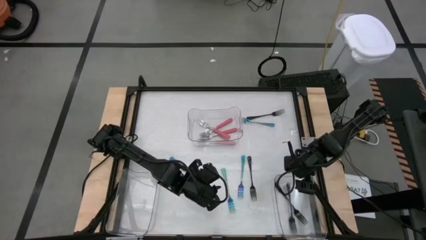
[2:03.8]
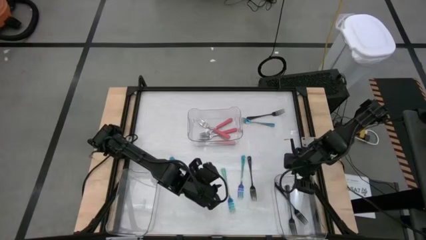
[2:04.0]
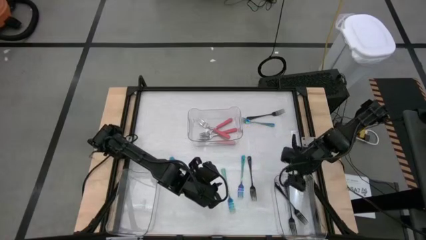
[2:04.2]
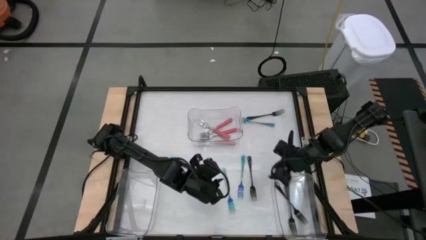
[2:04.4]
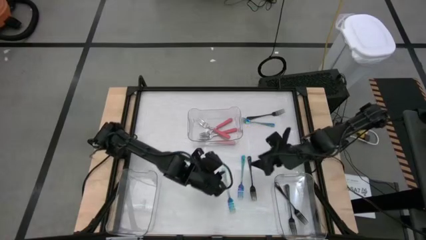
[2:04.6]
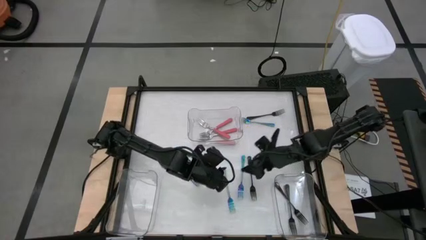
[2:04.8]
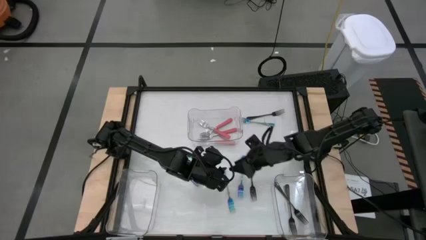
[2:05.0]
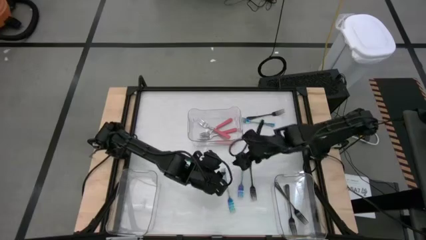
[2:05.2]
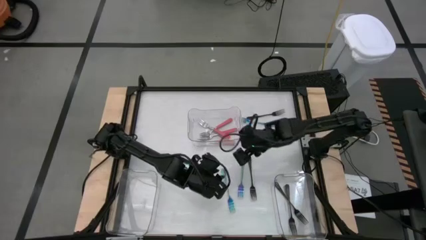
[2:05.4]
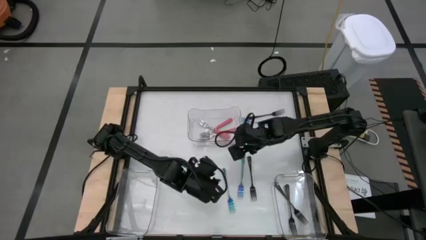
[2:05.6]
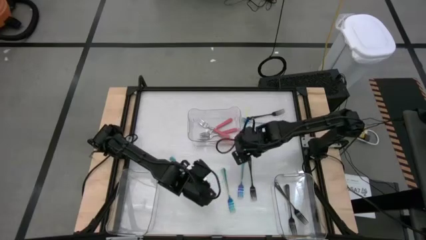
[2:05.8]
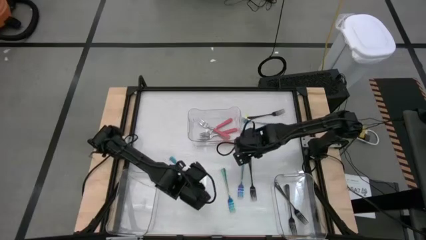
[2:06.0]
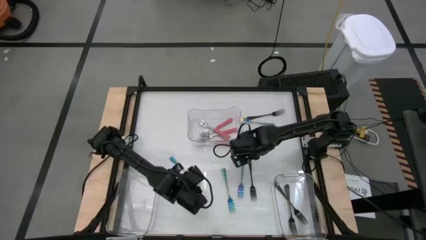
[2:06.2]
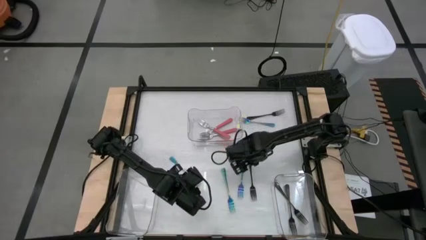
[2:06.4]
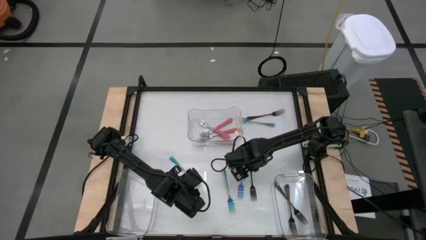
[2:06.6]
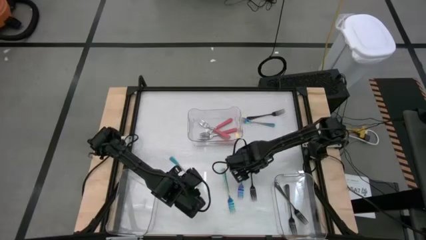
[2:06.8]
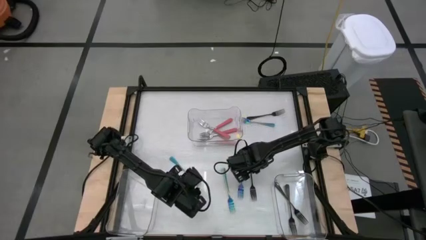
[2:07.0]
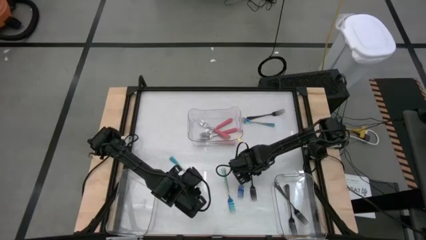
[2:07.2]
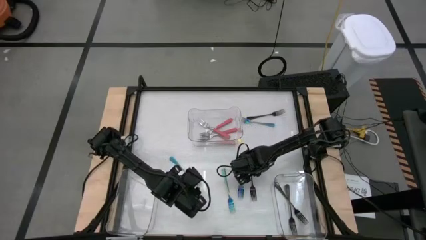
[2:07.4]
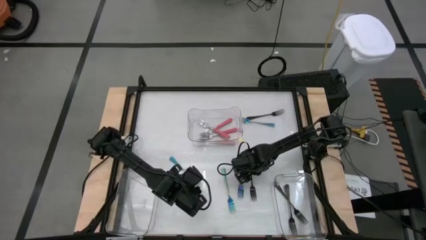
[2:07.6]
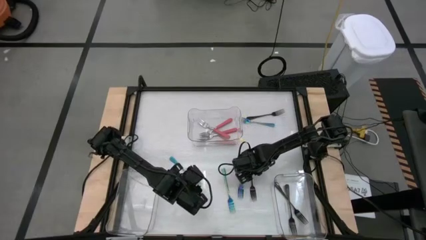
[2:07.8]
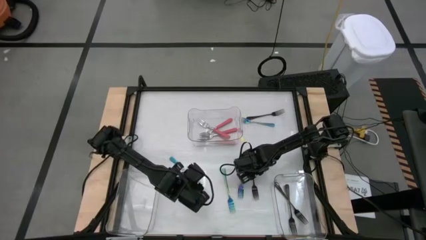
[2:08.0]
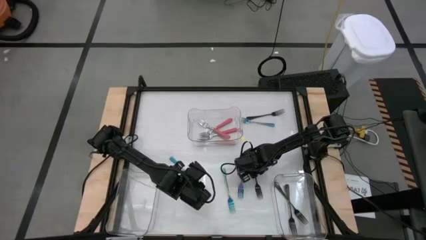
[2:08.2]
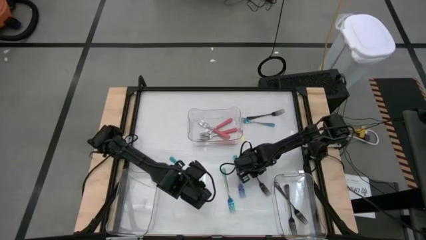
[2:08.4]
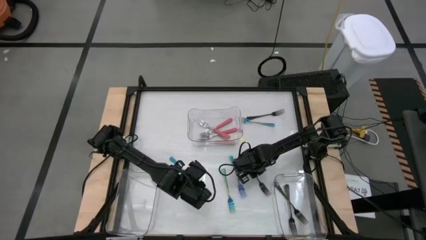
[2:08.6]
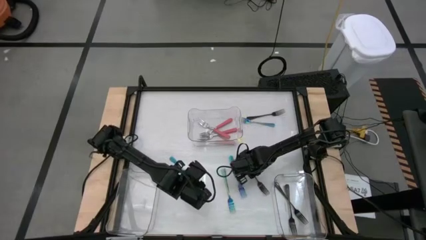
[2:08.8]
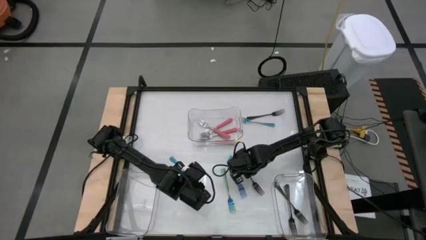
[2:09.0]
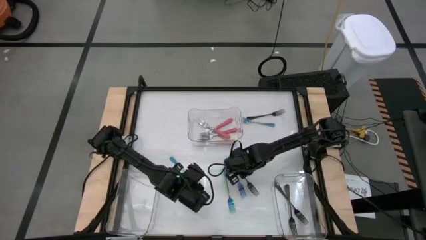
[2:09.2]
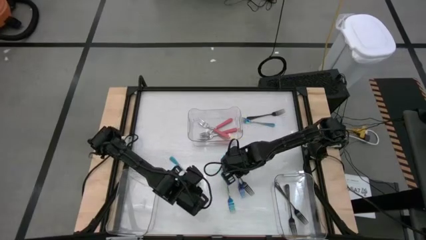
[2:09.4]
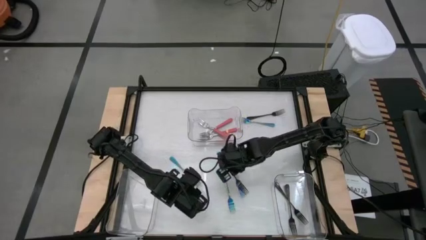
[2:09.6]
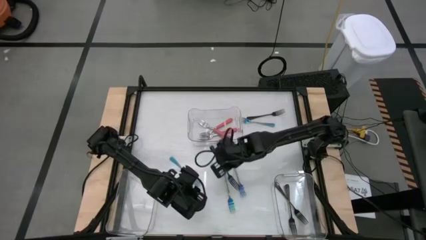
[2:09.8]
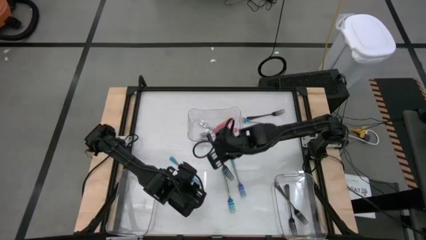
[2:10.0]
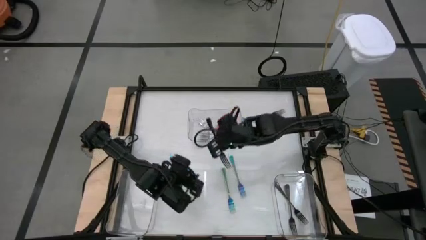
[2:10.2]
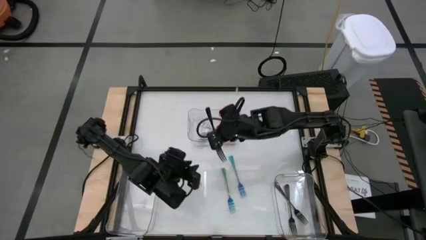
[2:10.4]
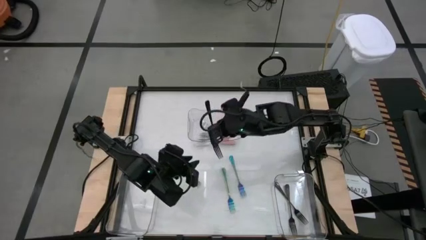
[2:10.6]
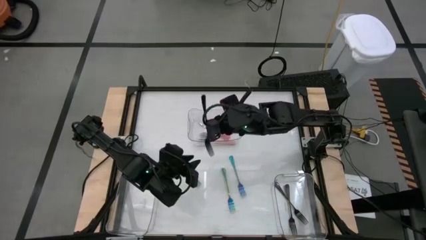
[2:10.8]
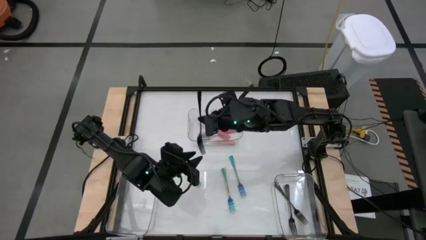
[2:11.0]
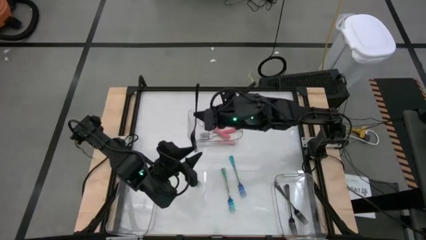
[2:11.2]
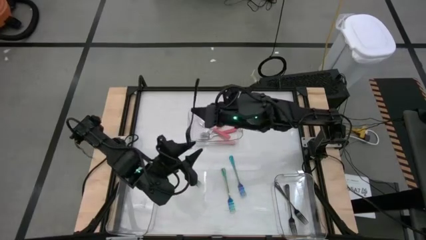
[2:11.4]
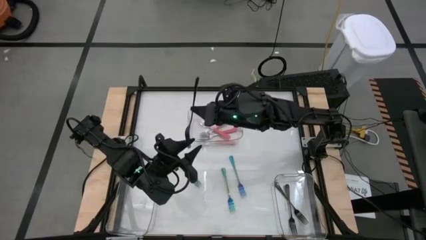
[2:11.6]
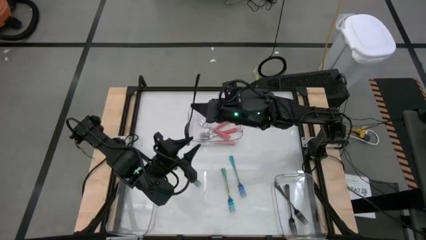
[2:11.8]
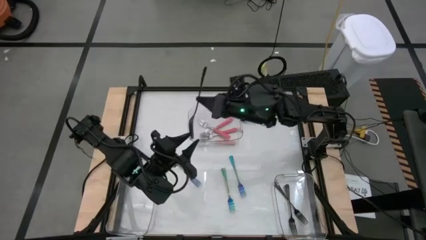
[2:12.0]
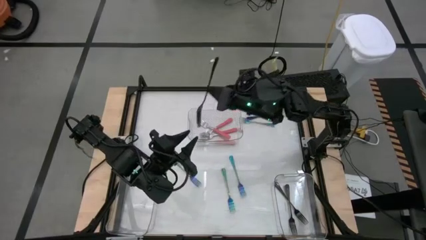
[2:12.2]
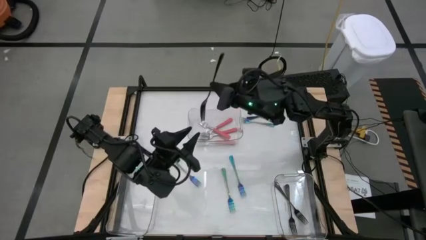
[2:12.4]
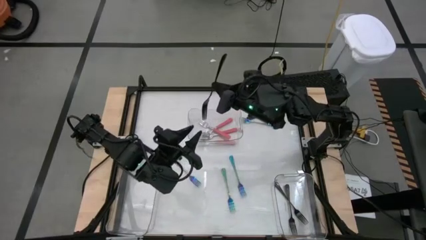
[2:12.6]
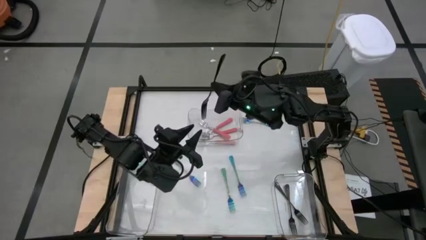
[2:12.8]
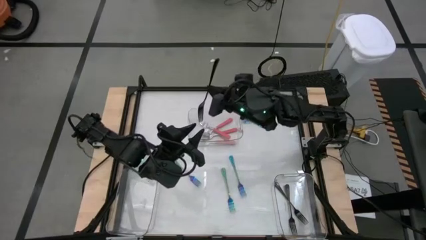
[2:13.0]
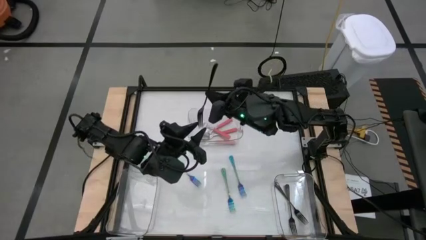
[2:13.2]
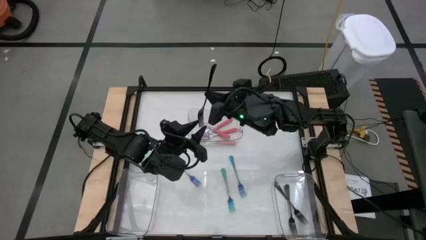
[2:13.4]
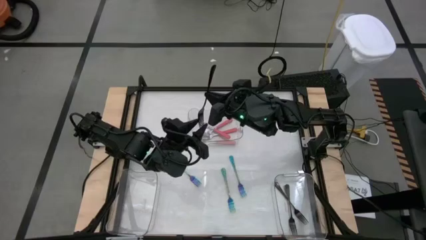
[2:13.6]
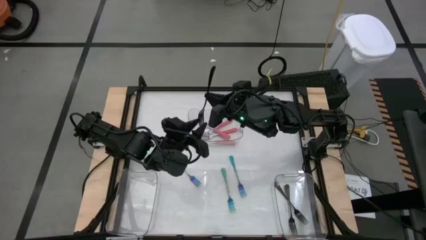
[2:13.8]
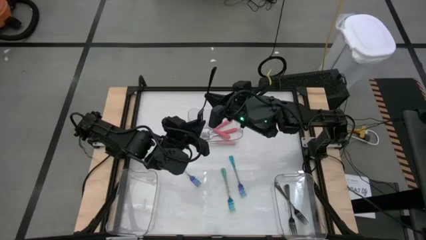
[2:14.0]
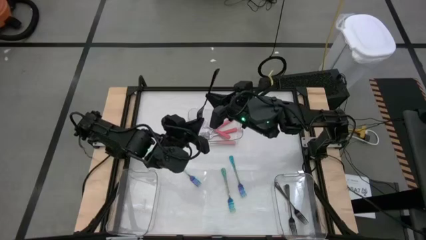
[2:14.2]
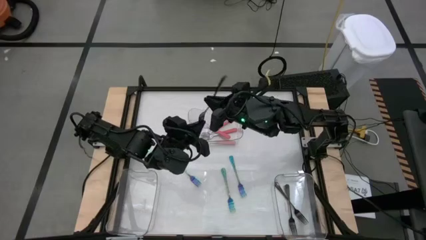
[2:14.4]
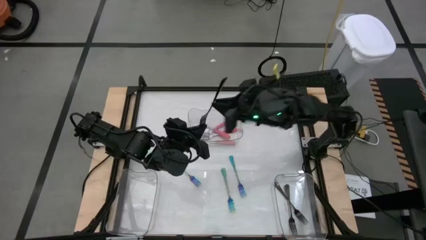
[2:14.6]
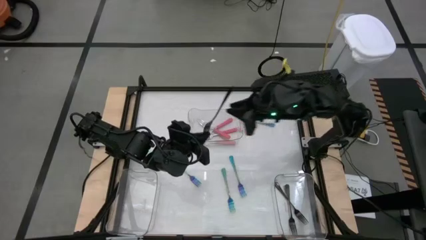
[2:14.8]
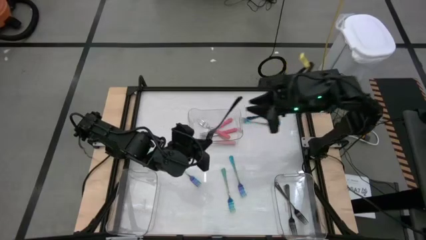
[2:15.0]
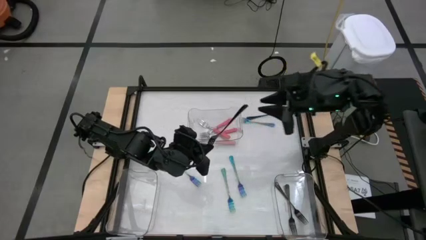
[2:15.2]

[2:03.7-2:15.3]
Task: Sort silverware by color (type)
Put the black fork into the right transparent bin
